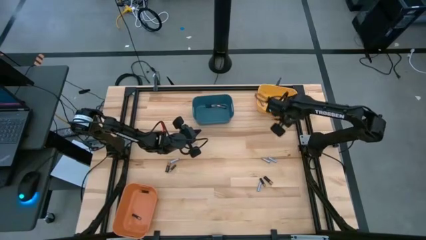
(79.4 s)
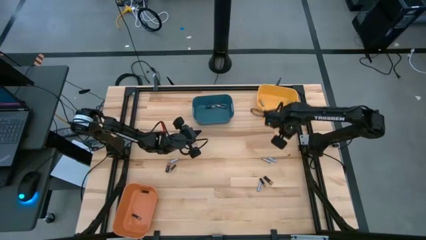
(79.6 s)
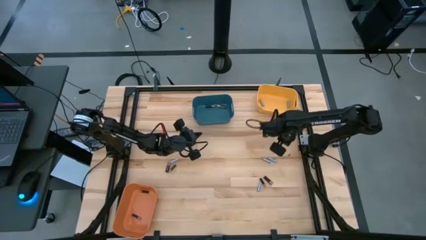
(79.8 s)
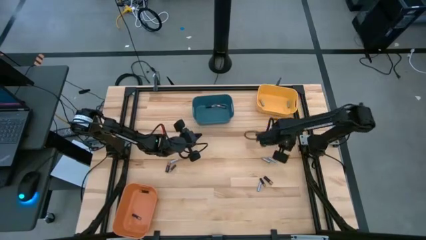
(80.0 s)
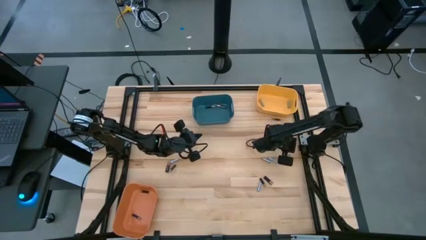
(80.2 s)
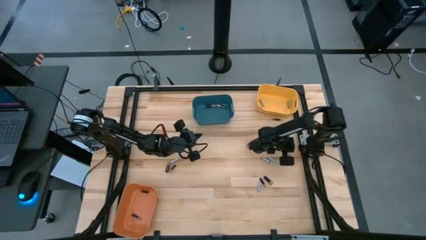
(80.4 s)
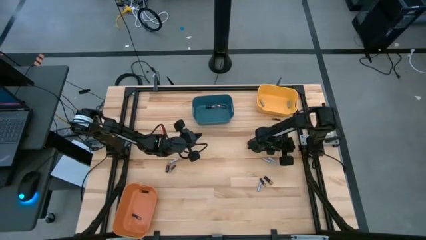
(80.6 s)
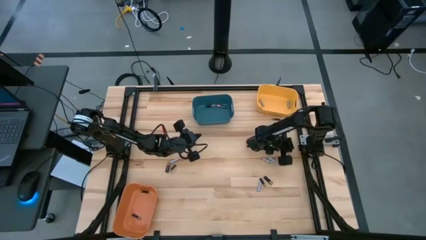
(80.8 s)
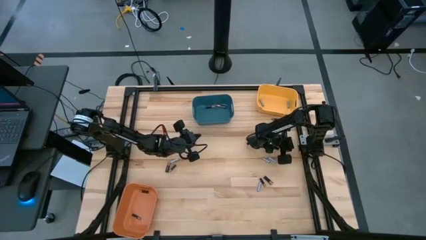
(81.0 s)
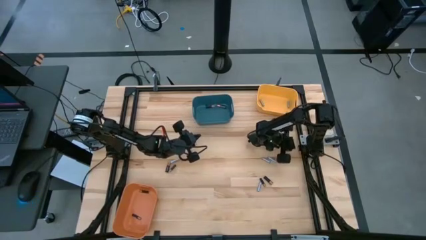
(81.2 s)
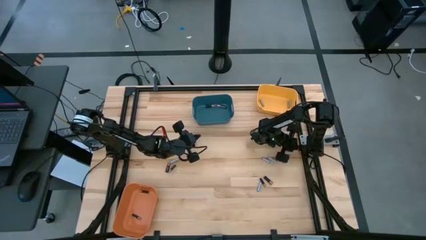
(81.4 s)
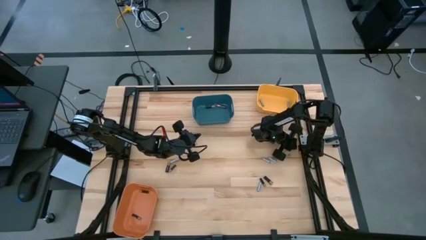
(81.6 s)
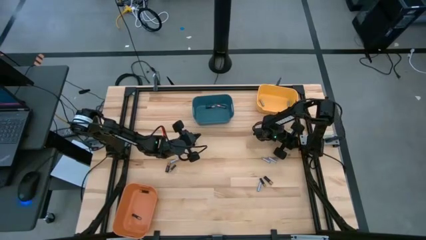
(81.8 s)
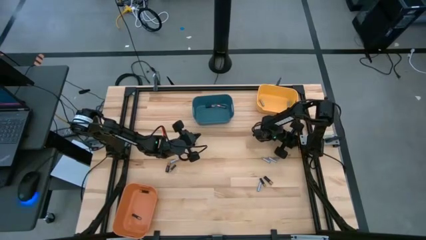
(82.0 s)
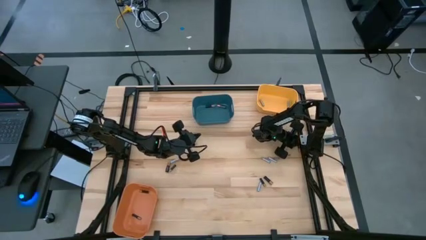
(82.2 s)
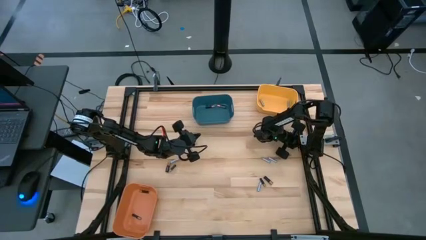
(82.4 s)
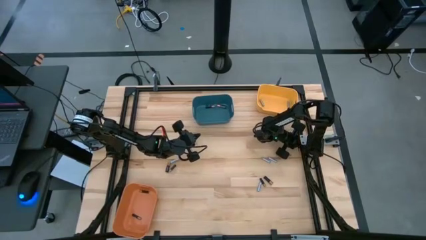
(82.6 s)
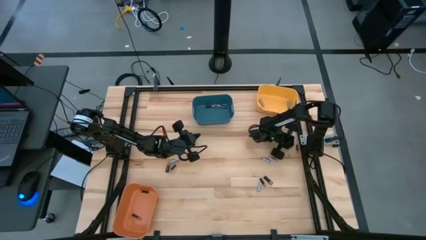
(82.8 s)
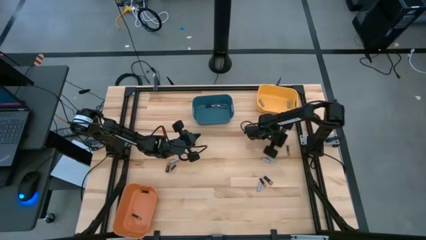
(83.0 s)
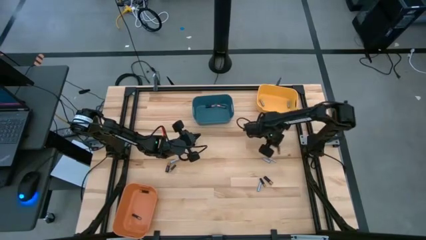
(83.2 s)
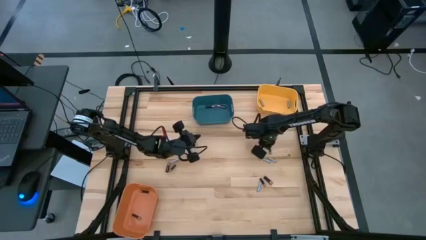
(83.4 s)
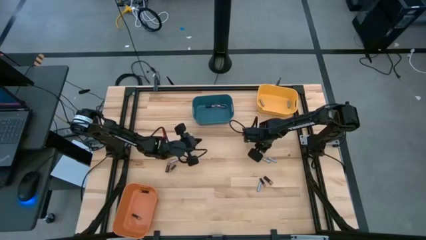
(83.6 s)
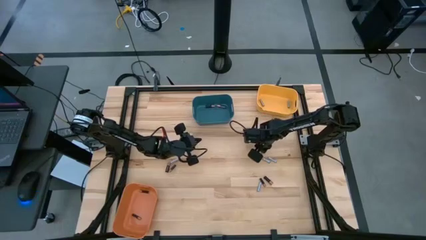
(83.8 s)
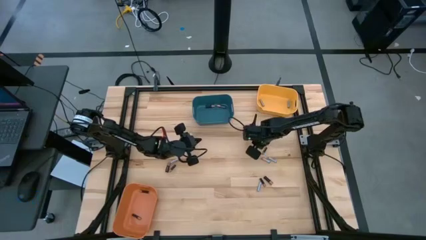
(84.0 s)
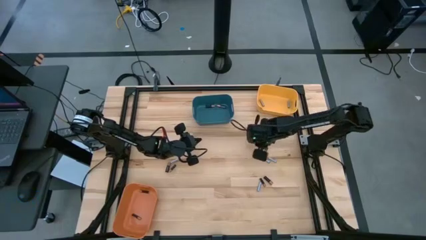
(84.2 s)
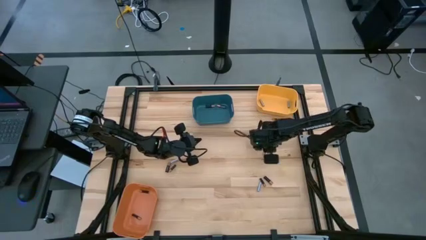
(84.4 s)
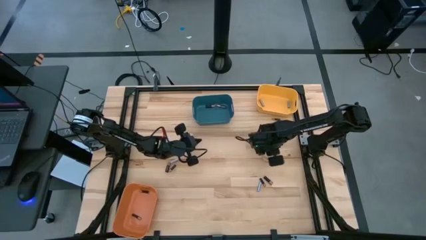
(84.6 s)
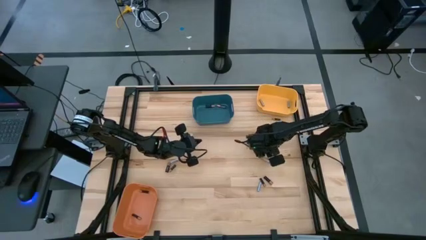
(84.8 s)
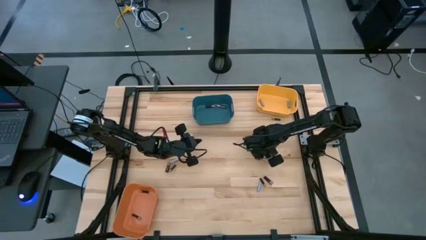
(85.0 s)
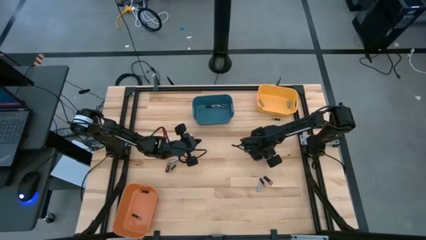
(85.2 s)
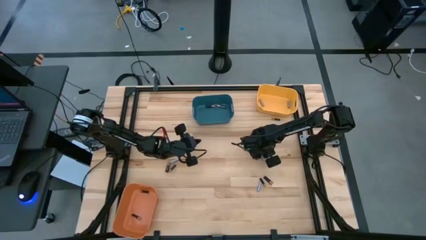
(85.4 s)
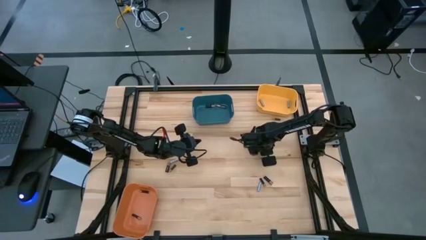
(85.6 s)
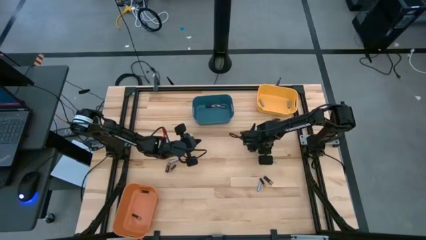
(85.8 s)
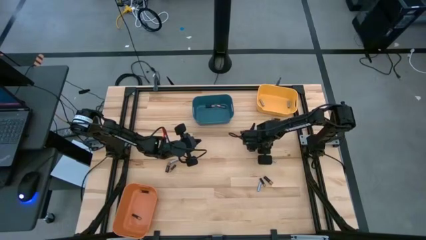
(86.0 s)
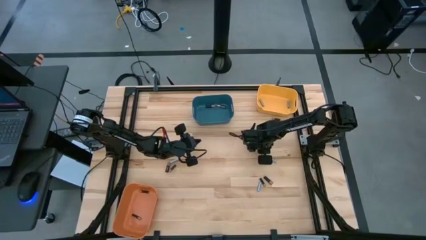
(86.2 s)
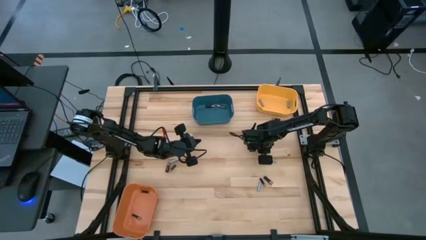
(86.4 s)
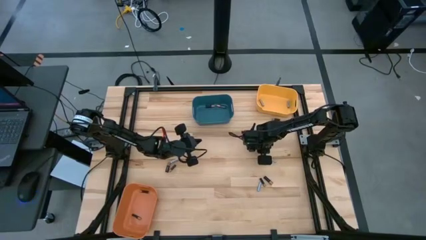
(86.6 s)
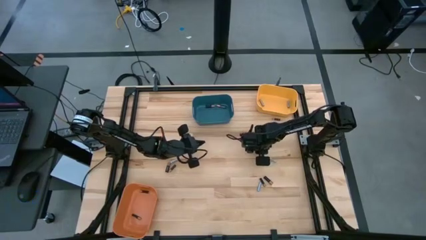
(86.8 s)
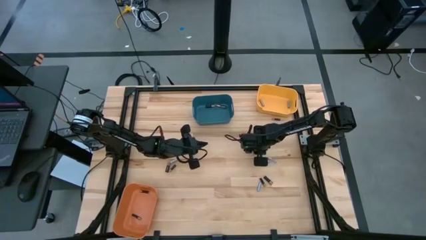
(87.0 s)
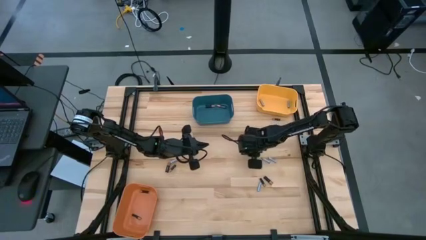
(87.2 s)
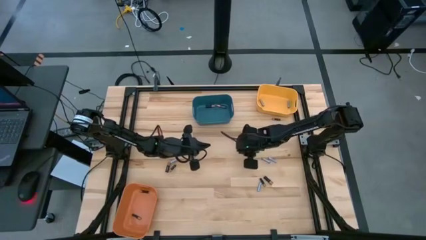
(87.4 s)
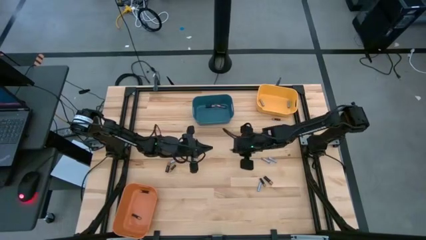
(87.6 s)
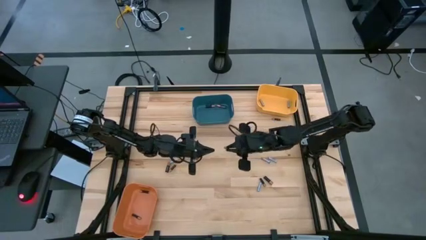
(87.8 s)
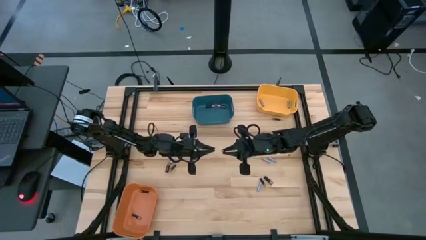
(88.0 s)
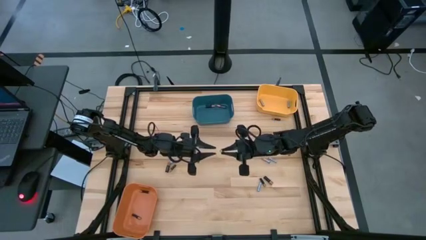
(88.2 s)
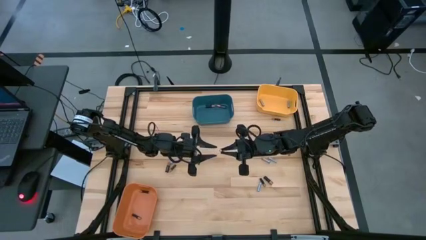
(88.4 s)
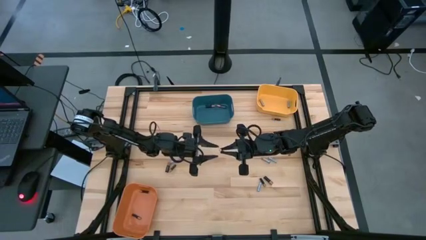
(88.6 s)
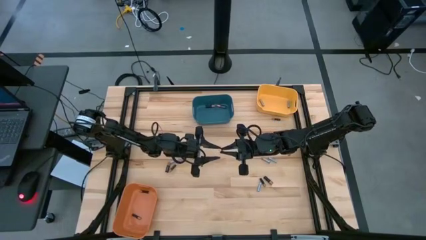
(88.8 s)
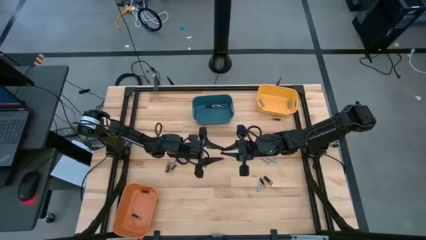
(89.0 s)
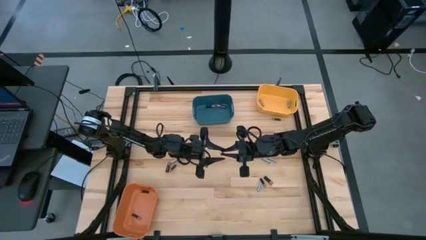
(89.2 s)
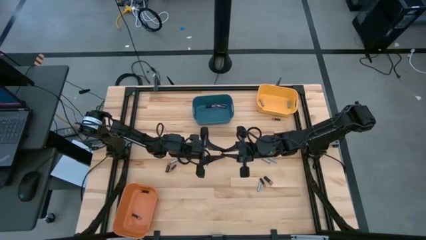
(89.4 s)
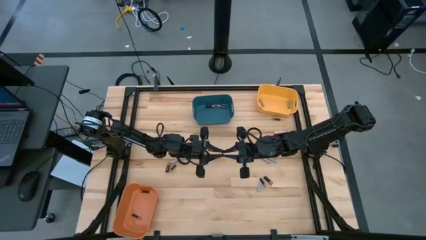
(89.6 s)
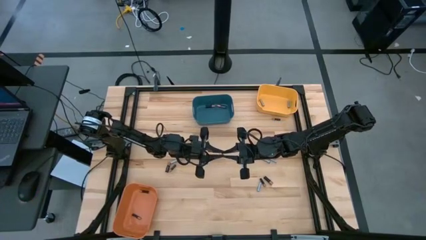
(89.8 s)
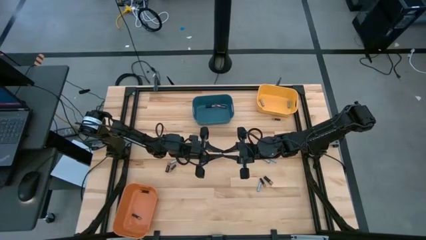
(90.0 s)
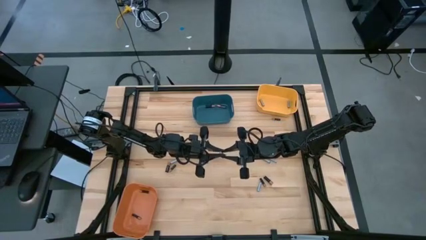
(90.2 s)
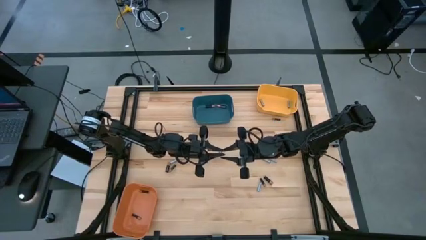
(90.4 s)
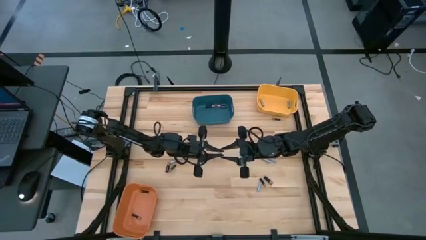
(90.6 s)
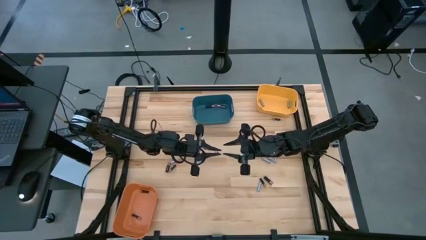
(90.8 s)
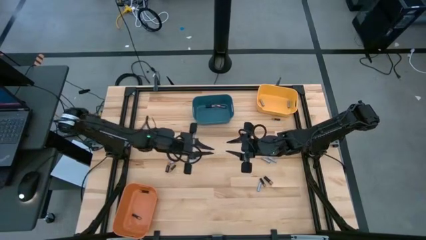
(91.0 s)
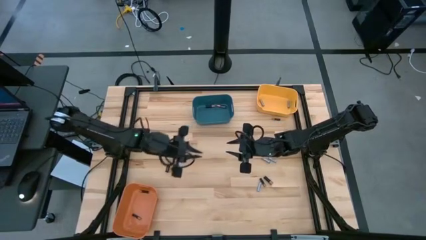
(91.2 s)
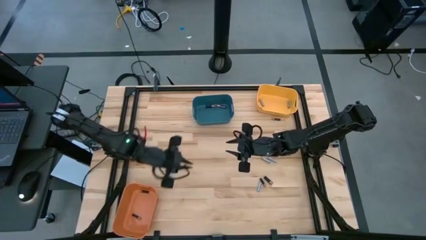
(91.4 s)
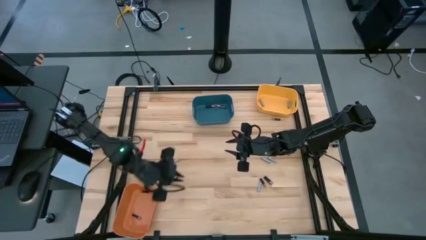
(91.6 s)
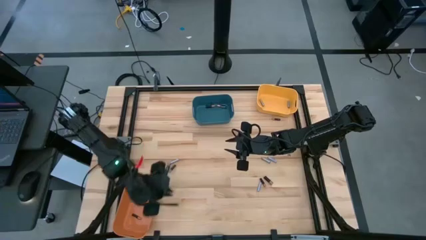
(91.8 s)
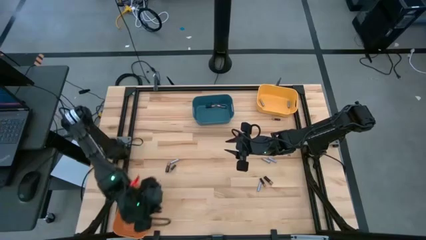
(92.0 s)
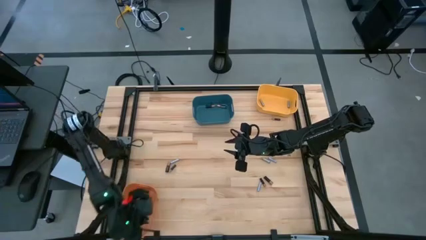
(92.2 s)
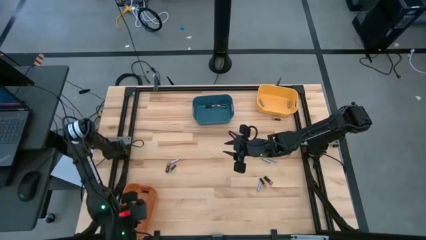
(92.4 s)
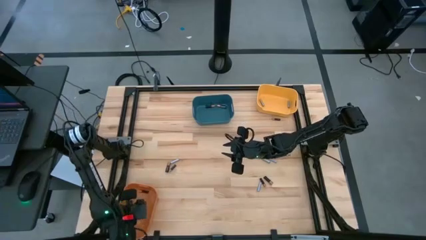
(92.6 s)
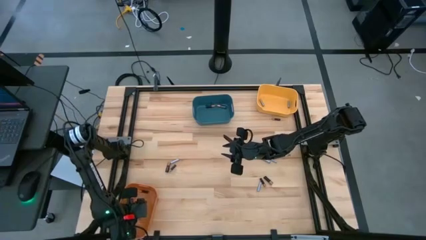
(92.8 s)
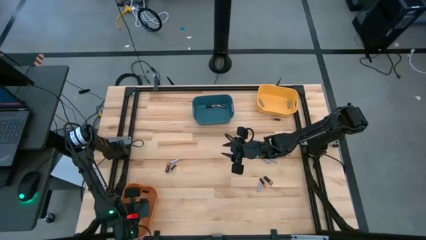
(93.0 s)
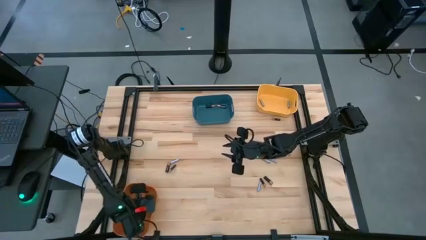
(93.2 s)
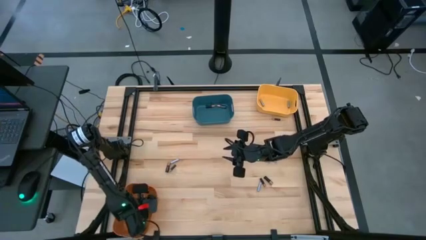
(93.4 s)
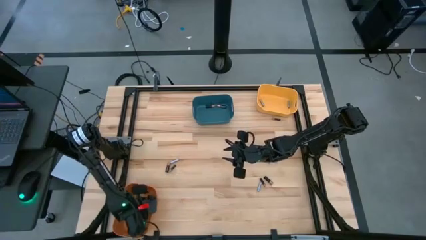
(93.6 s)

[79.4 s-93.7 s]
Task: Sort batteries
Put the small black battery into the orange bin

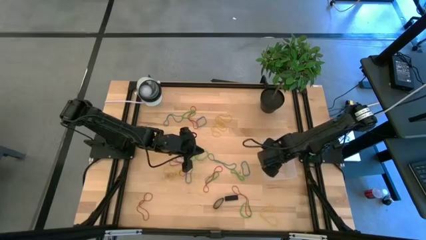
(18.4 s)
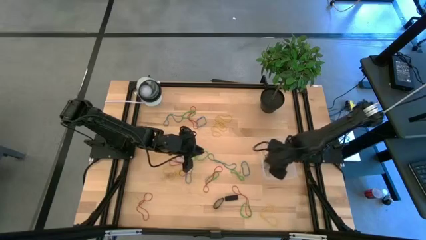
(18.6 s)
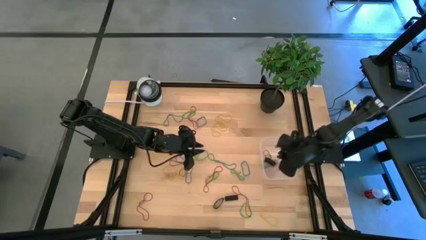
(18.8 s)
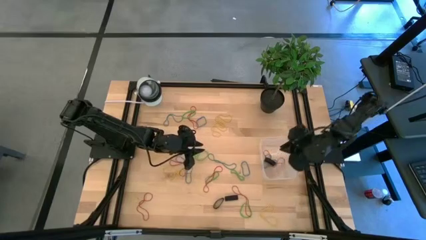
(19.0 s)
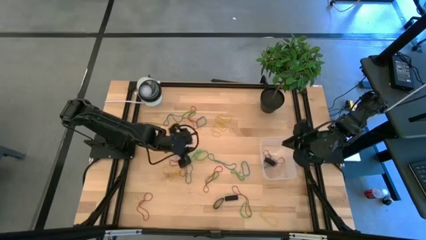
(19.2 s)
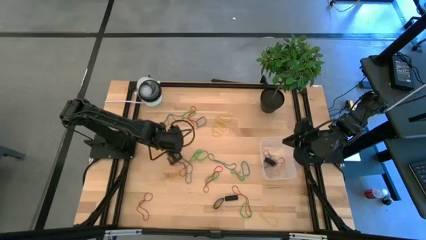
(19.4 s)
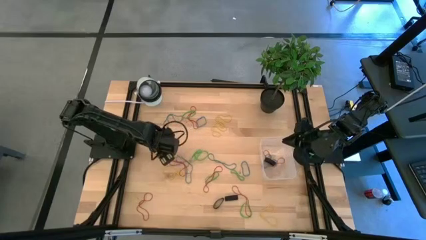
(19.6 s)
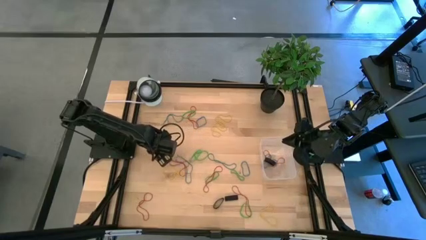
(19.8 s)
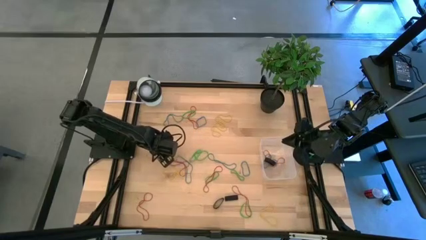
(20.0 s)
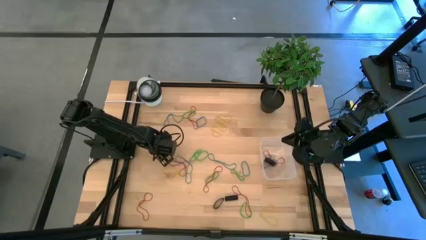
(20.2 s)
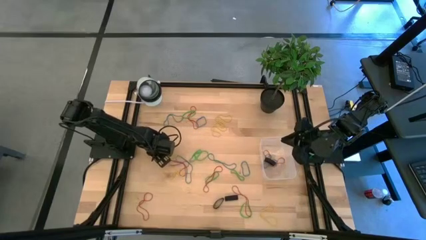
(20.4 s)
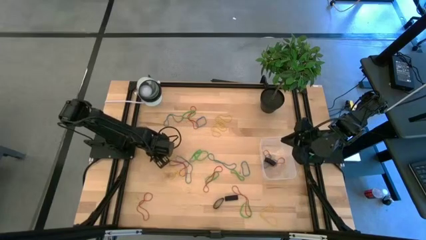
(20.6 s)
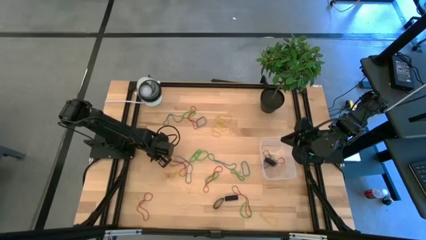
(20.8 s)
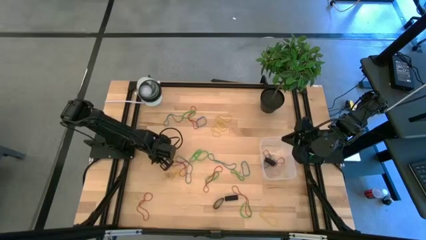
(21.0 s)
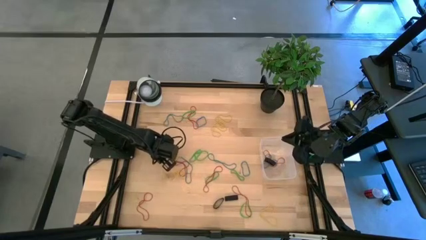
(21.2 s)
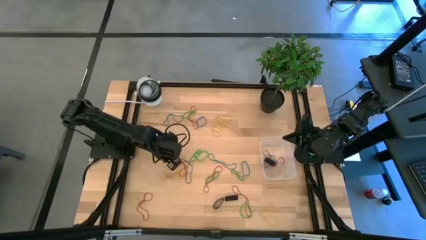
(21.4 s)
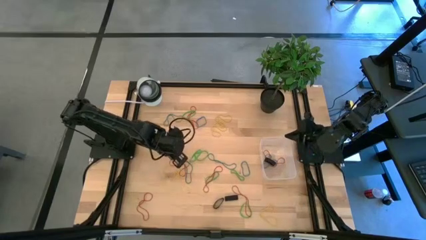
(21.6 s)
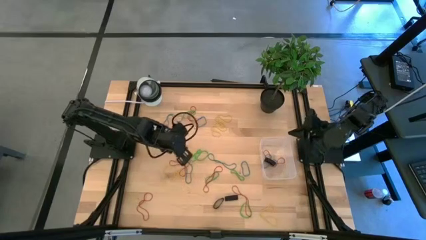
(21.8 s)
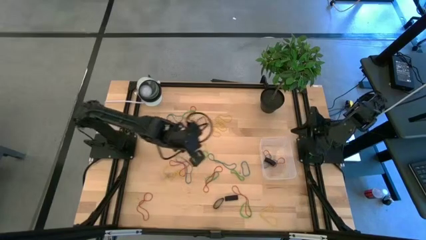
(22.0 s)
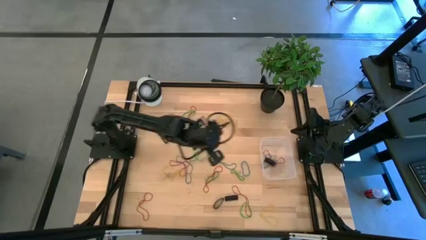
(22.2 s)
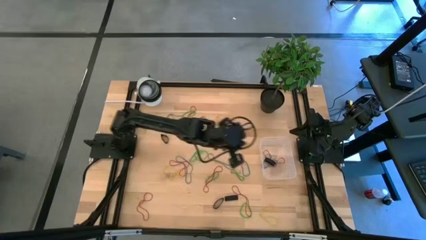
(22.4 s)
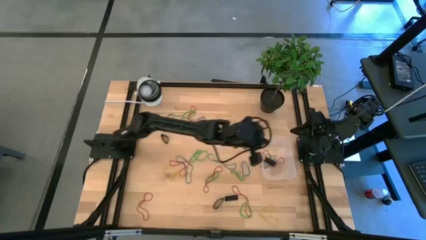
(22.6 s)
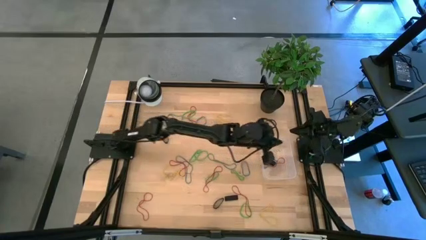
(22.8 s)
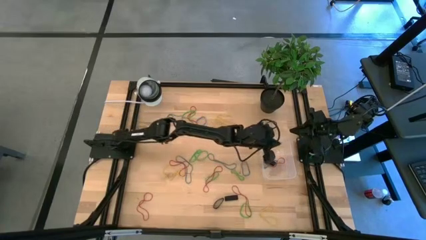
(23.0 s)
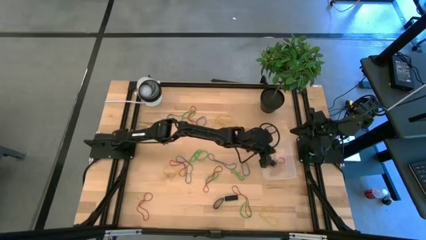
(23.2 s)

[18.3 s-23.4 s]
Task: Pick and place rubber bands into bin
Put the yellow rubber band into the transparent bin
